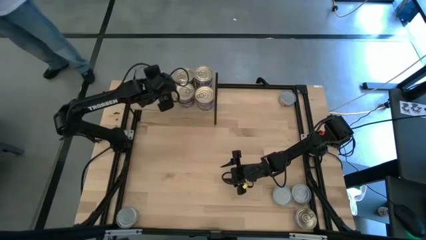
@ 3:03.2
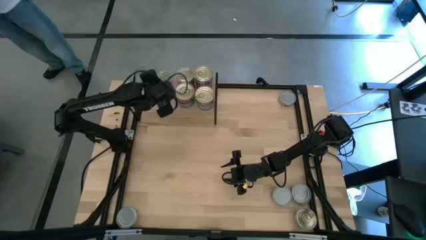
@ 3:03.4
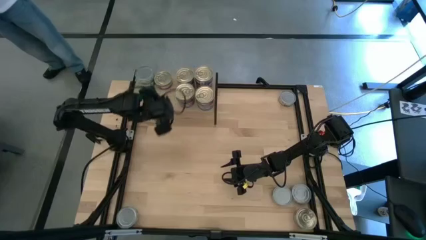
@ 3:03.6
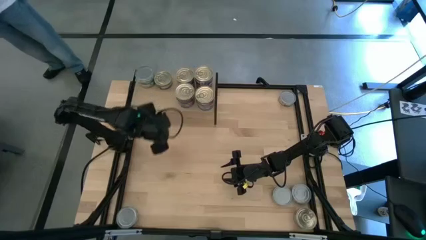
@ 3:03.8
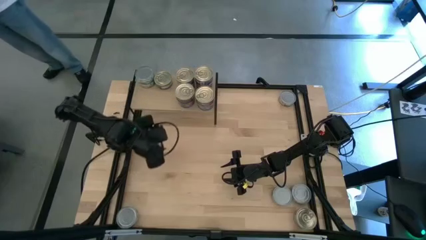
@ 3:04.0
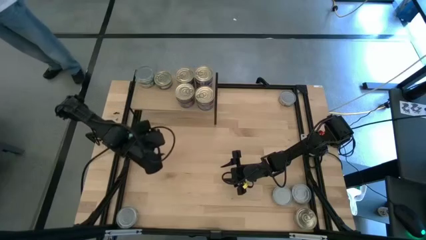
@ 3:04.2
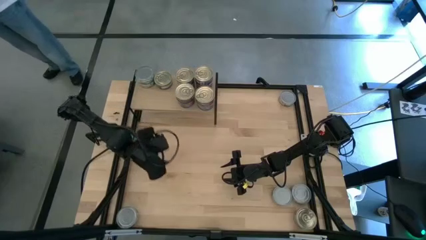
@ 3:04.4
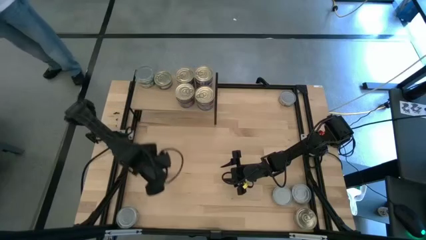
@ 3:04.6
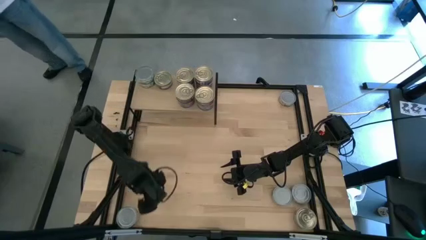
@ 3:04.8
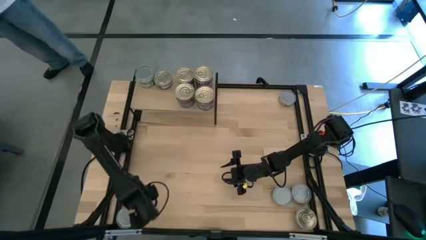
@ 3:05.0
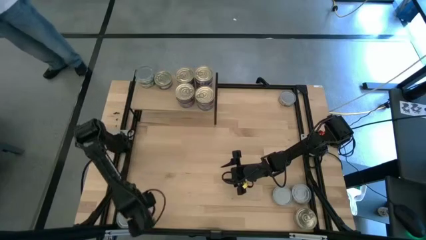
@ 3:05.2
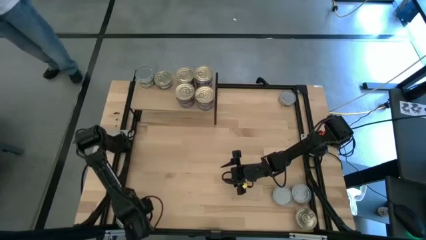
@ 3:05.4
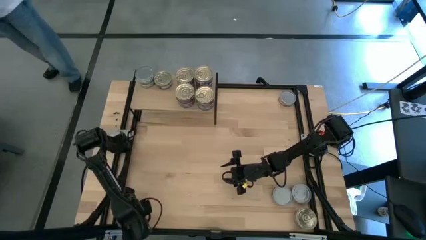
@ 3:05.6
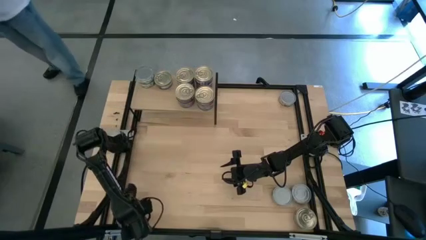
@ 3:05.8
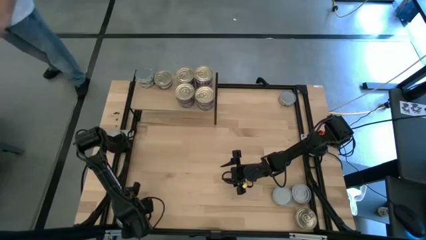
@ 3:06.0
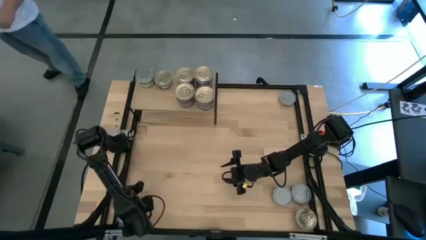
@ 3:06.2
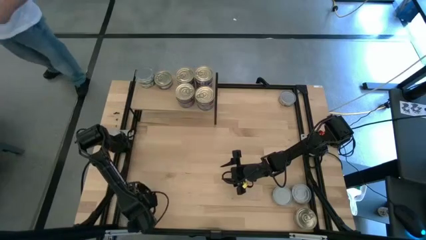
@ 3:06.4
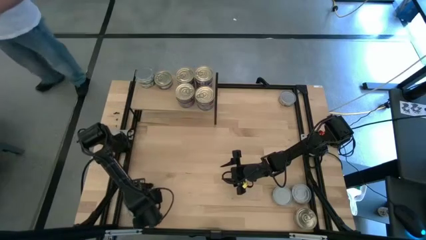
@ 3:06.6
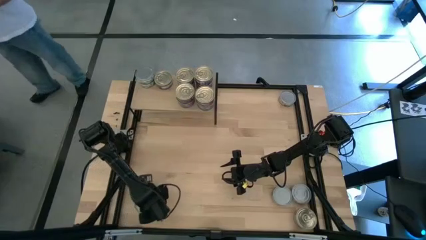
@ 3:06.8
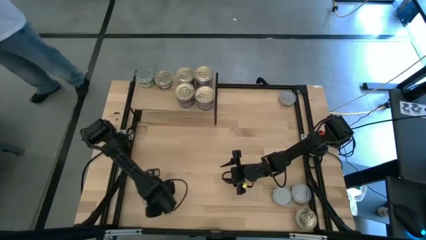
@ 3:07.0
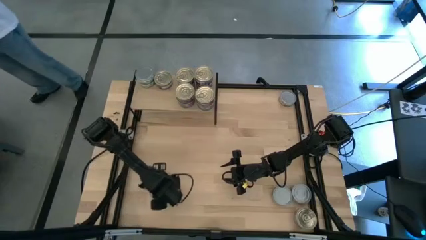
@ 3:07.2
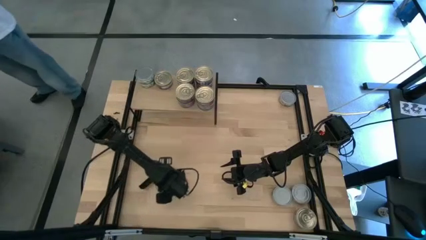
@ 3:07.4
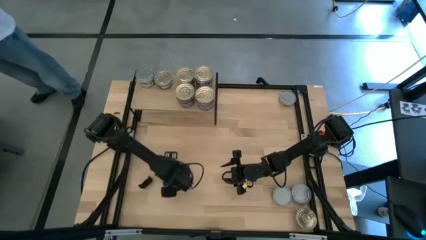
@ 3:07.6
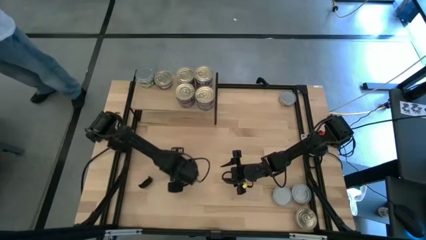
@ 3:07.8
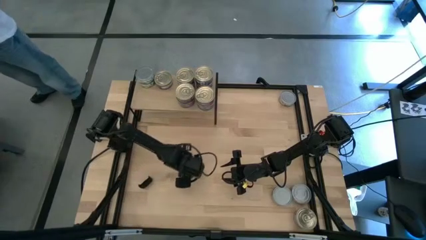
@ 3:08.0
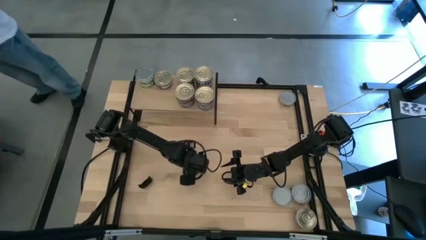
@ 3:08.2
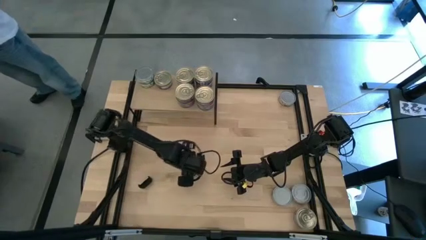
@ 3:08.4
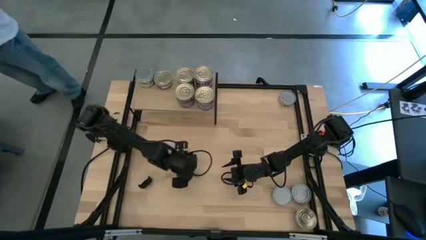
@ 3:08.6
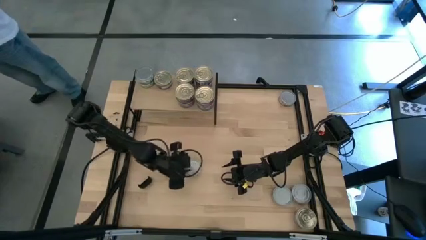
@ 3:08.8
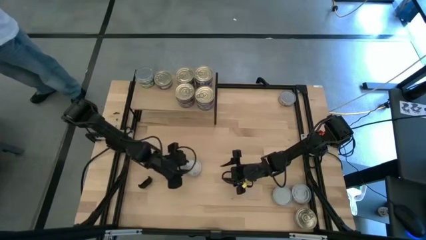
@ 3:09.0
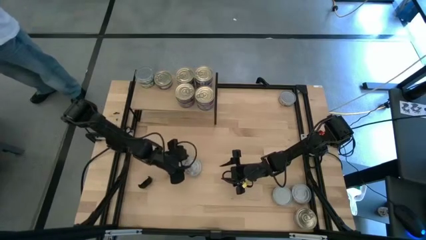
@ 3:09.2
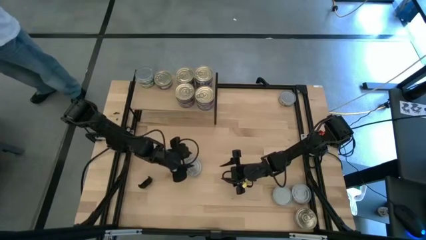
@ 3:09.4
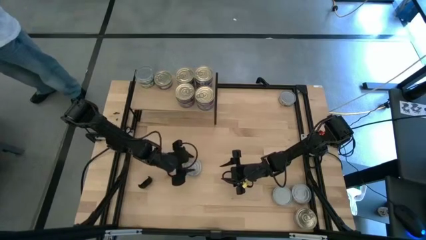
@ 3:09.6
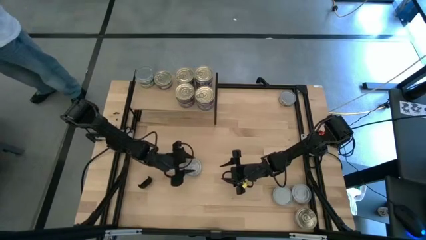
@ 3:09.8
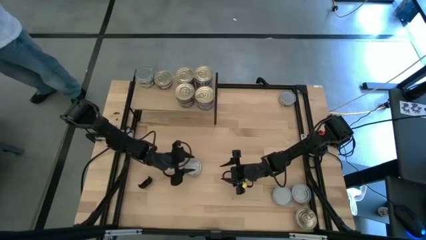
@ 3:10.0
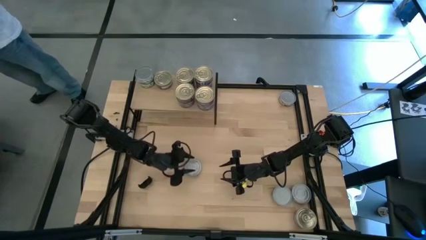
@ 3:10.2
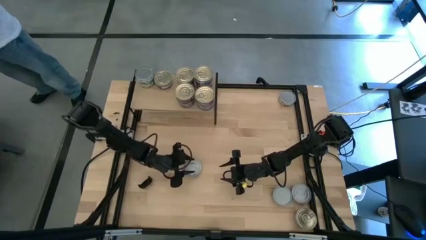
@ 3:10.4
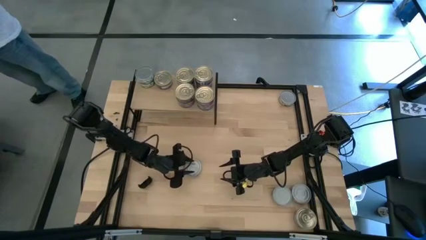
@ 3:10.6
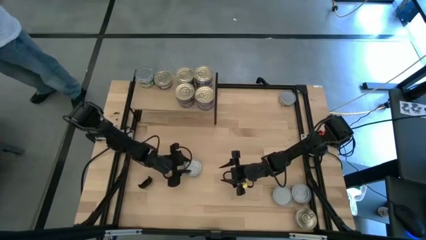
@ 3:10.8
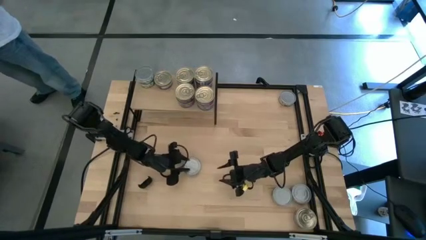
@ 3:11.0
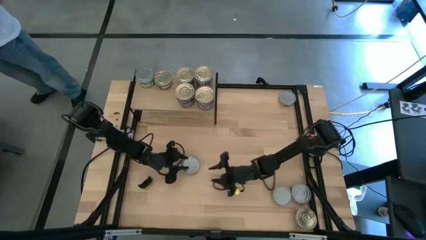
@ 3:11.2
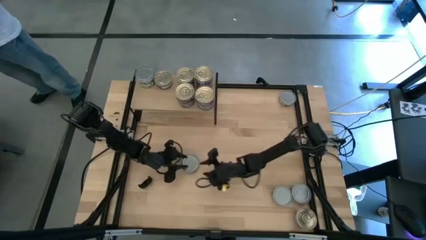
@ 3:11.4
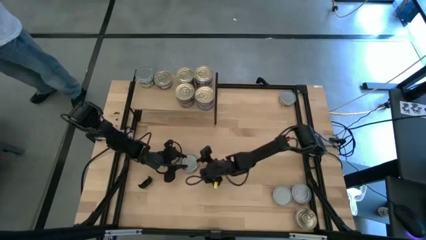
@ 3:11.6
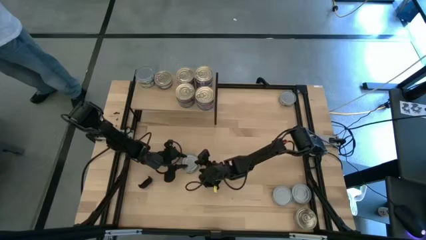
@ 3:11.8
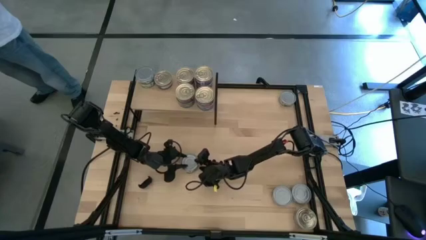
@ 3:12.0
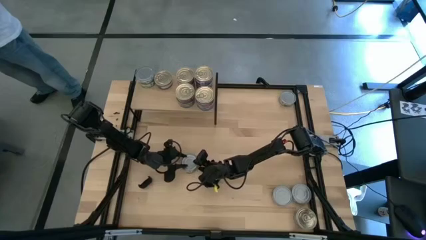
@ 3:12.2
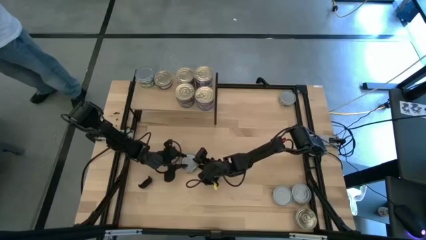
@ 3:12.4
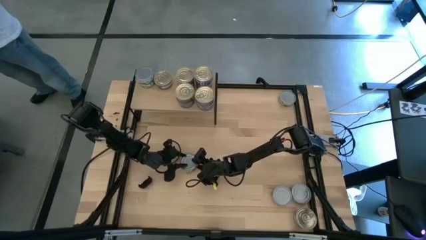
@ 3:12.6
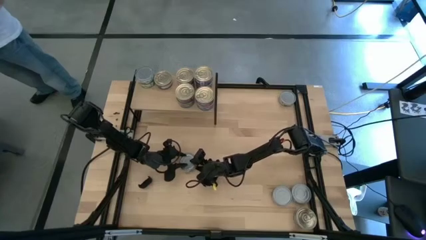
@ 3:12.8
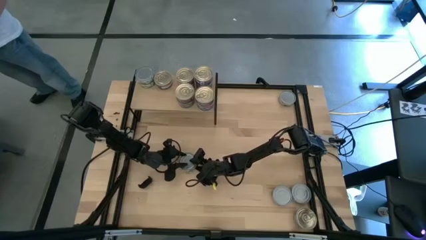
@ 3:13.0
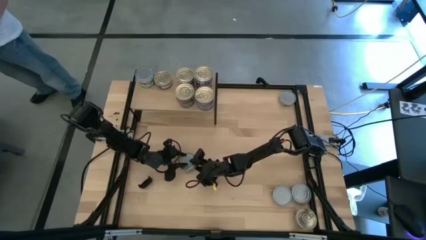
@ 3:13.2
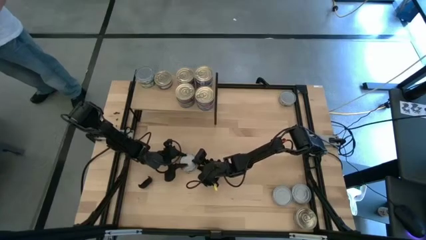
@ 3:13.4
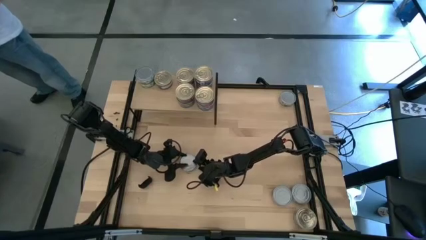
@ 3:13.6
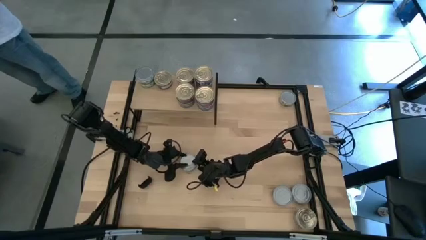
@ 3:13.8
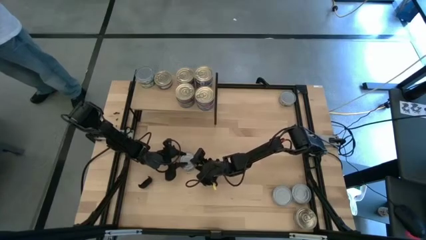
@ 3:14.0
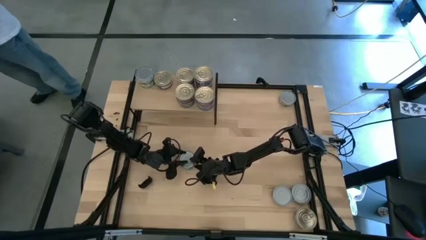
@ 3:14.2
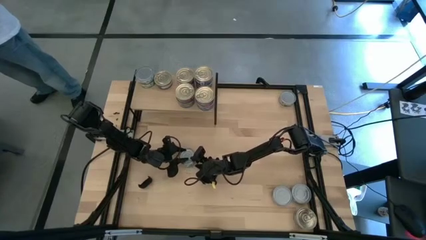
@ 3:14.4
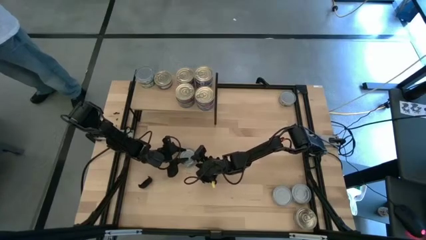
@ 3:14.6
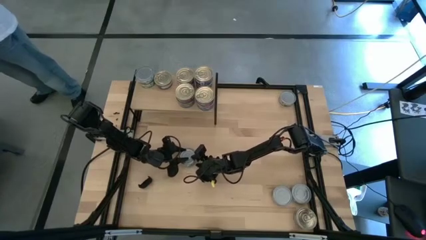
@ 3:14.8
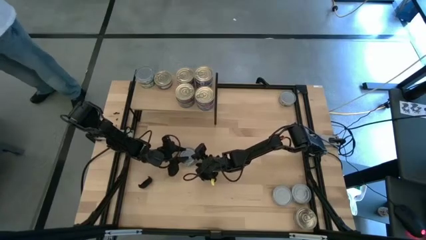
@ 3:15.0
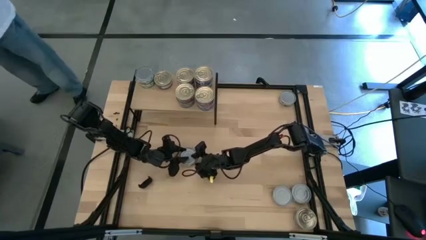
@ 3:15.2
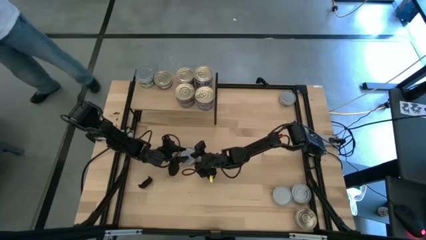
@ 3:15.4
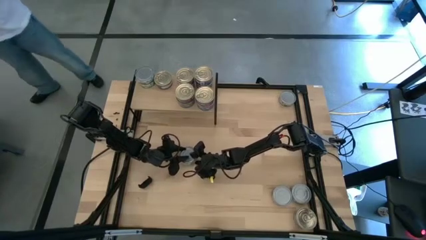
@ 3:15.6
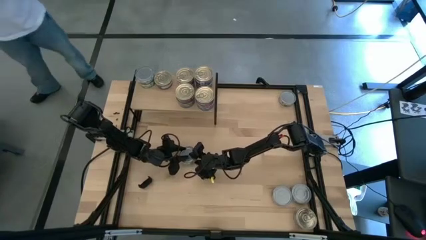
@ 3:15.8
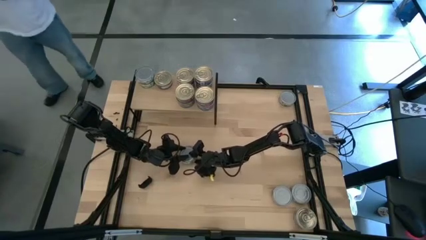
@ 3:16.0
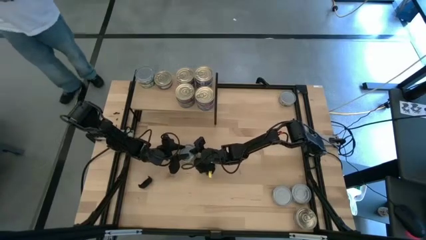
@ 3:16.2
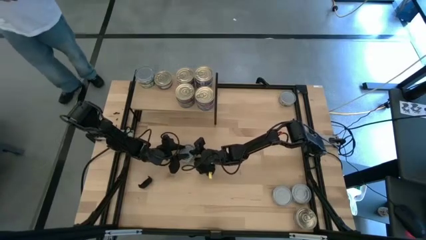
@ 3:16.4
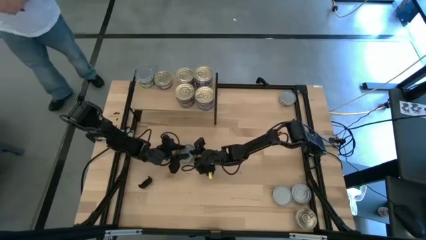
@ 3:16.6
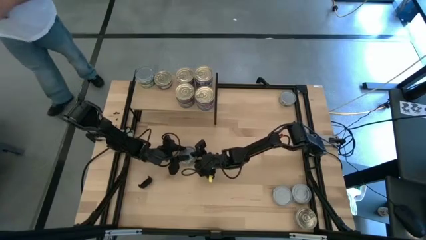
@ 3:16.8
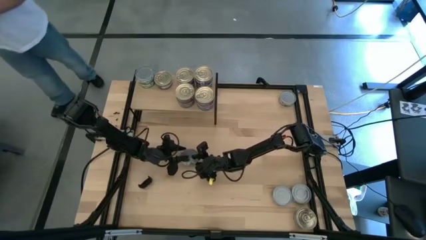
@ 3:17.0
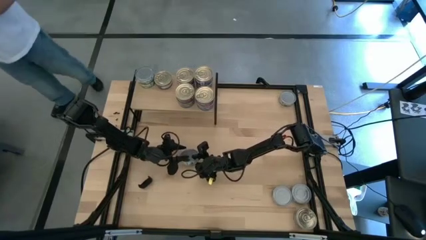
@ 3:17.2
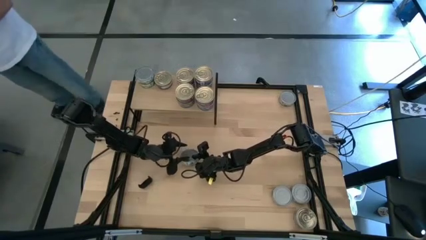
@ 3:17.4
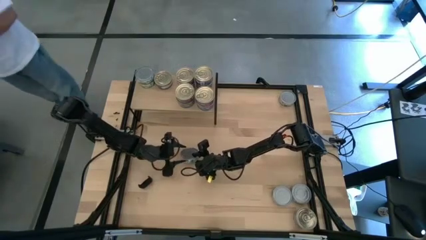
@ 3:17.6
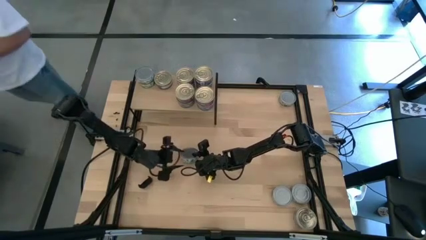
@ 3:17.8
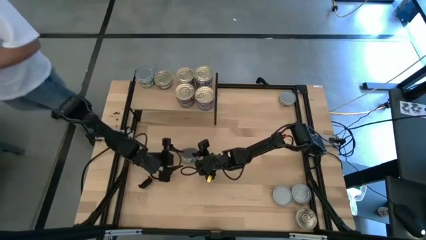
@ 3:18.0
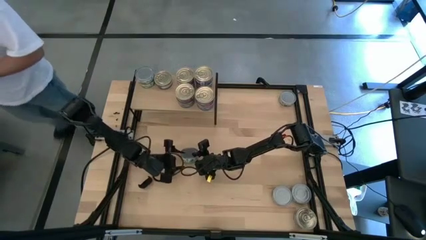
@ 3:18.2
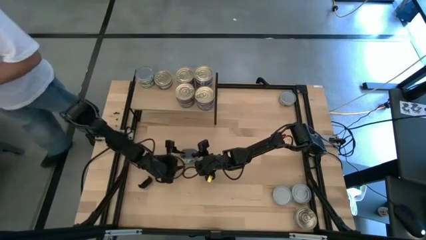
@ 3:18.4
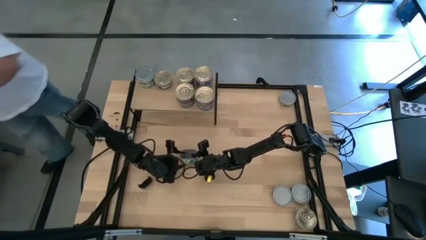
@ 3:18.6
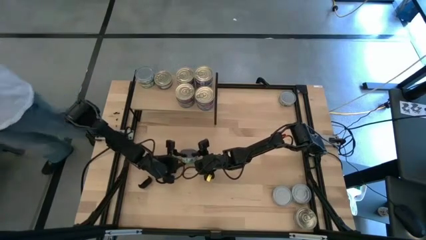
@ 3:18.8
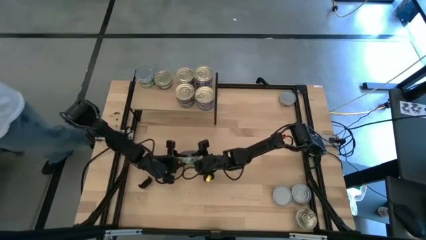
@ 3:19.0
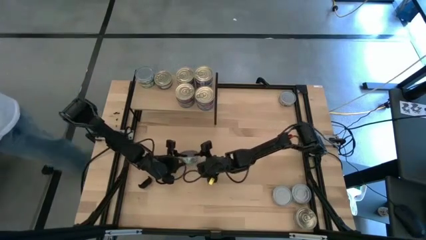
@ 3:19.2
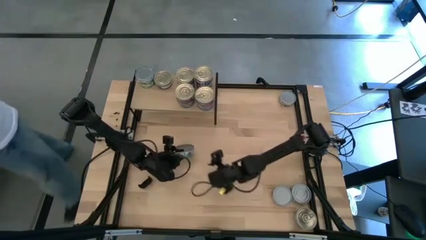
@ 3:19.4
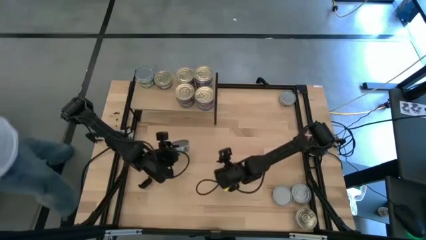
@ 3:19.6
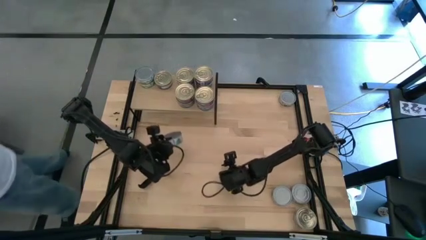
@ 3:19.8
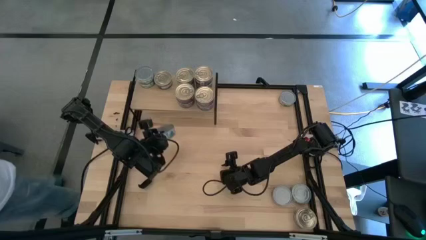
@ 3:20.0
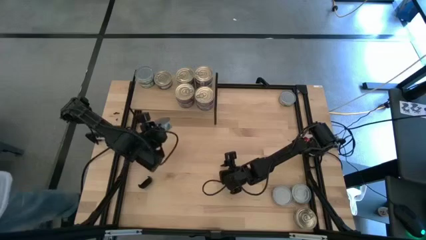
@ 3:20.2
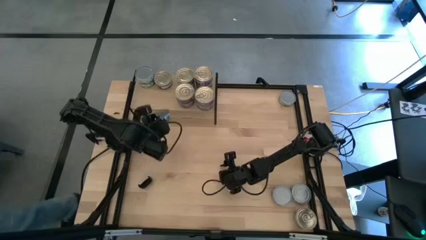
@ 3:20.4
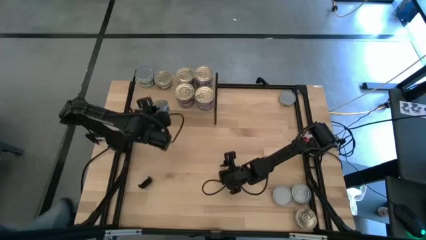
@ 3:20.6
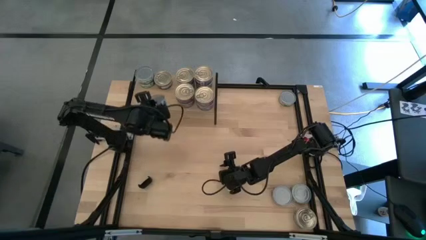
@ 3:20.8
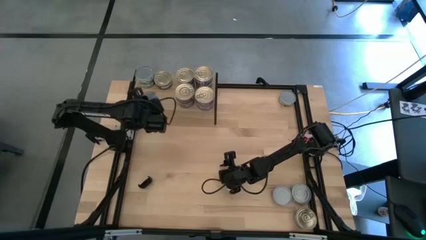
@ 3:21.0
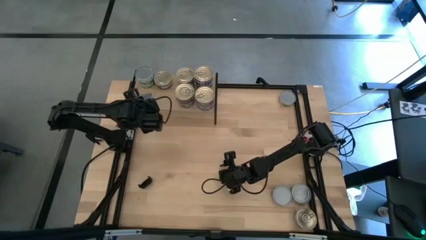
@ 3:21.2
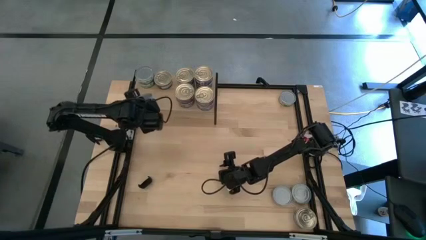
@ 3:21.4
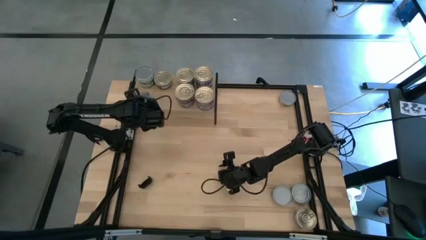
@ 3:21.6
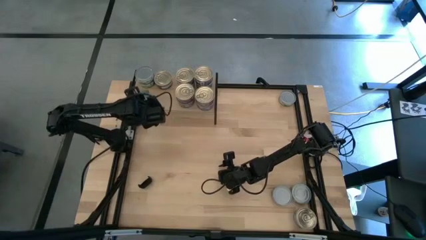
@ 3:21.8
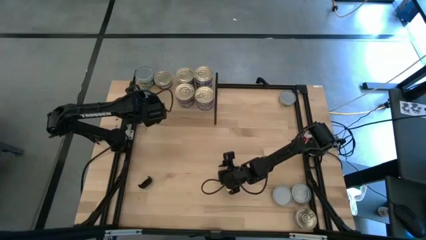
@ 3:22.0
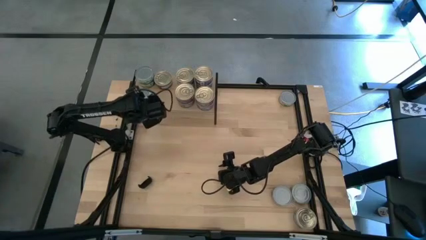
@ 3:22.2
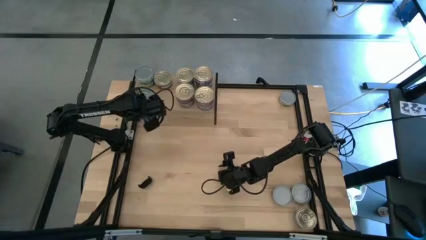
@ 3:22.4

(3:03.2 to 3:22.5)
Task: Stack canned seafood by type on shelf
Put the green tuna can on the shelf
